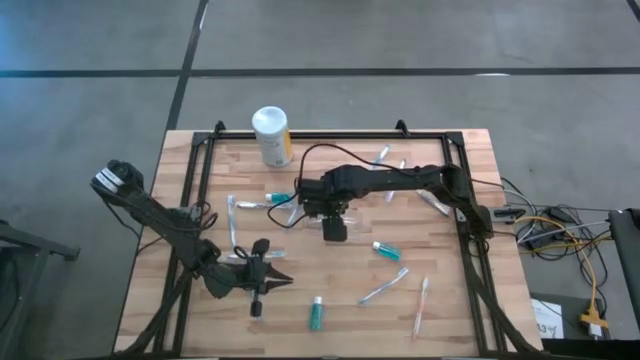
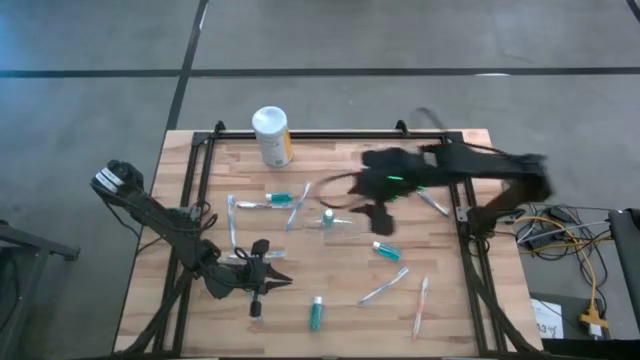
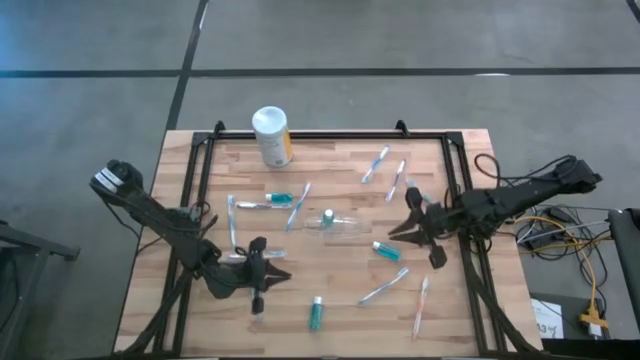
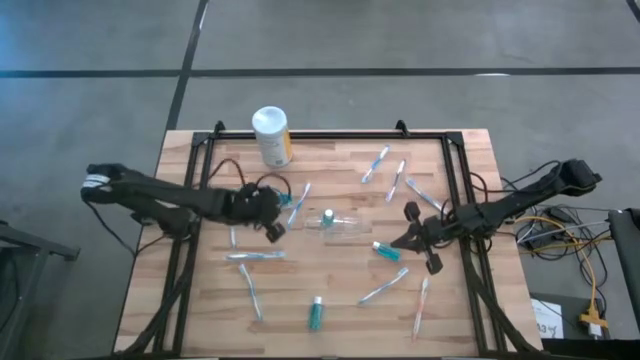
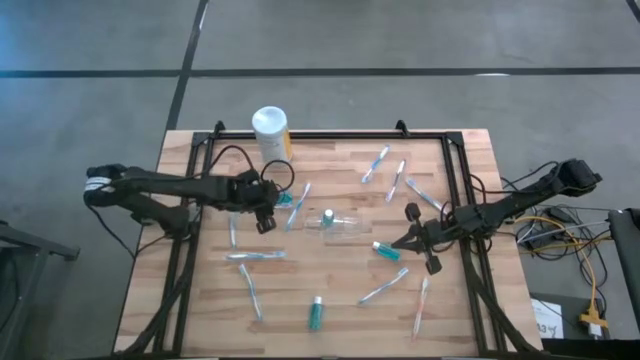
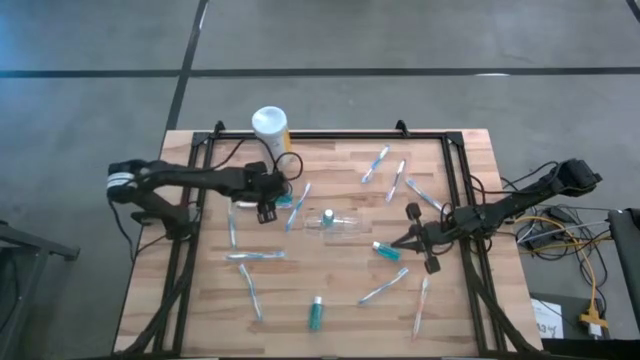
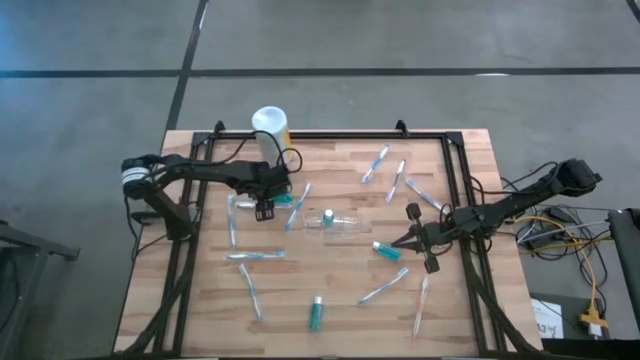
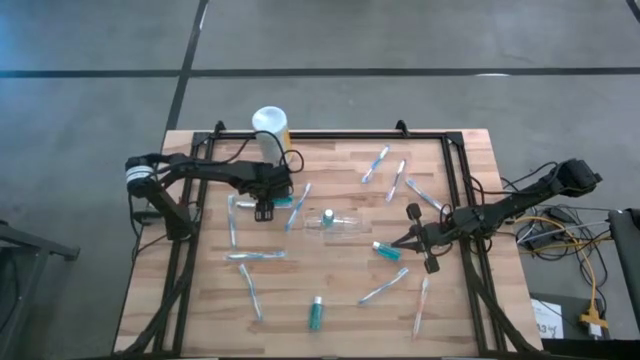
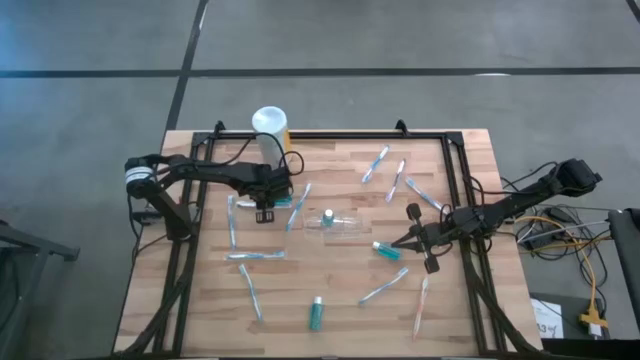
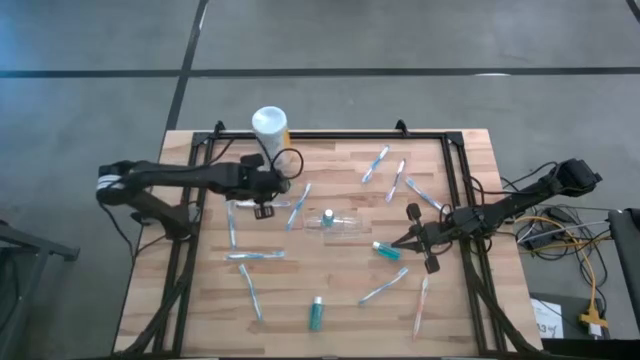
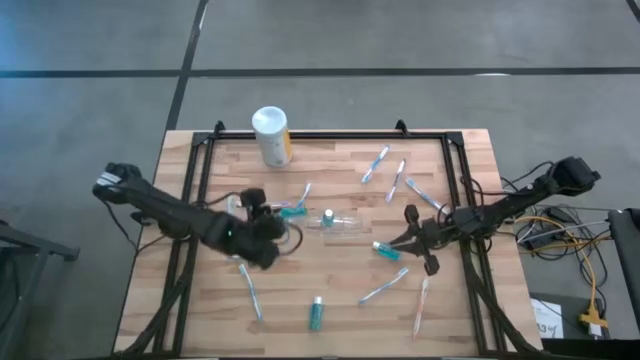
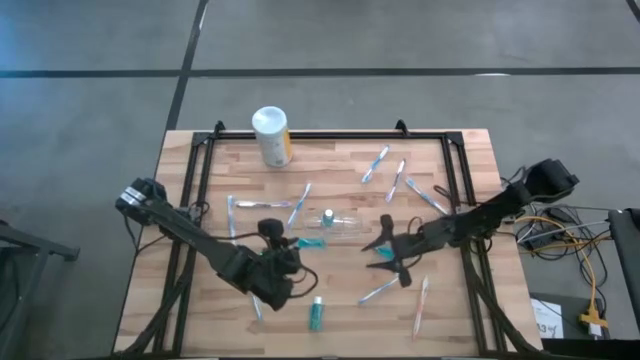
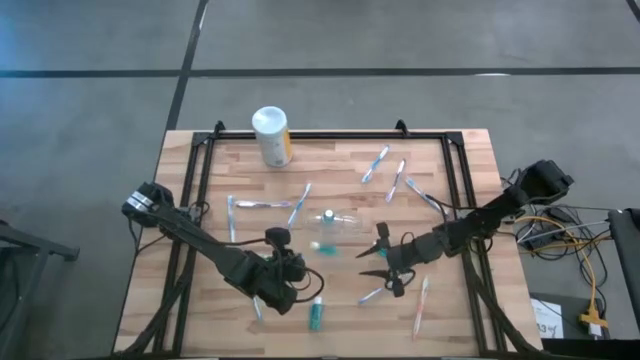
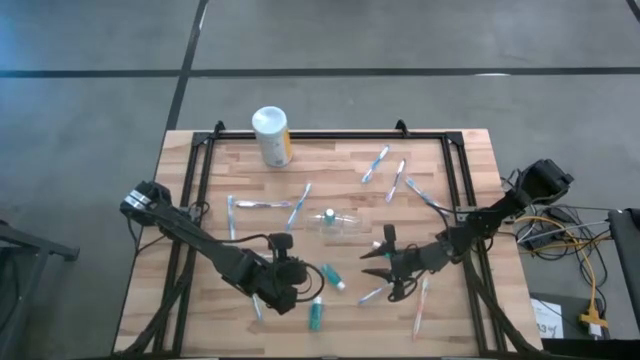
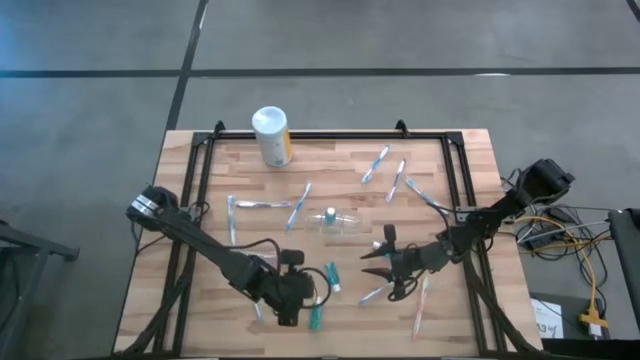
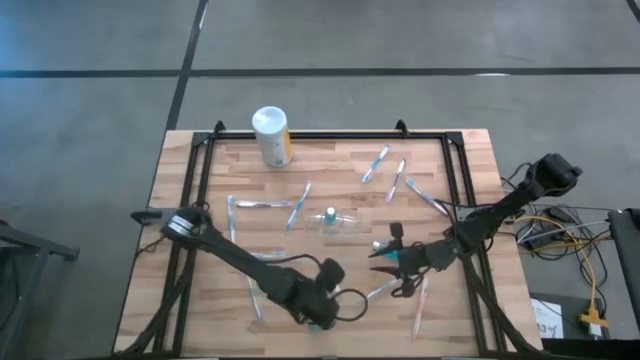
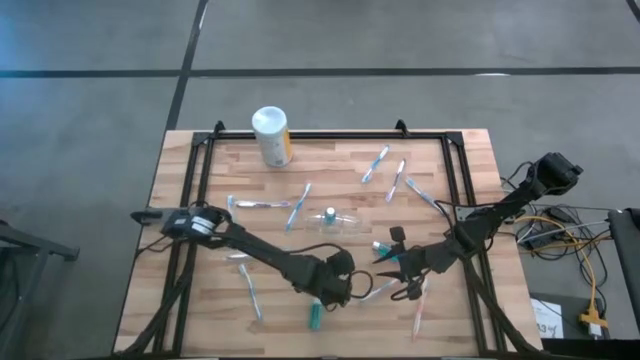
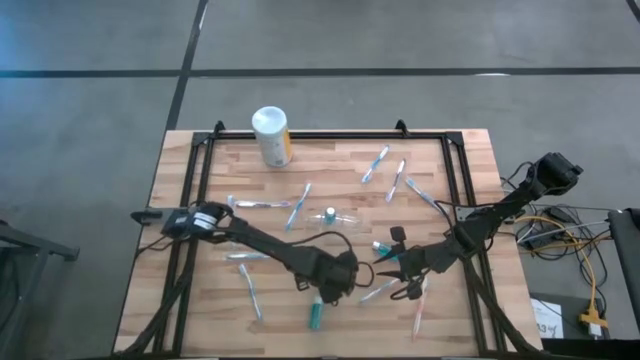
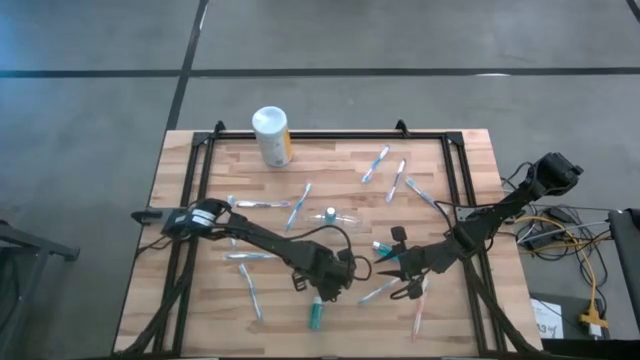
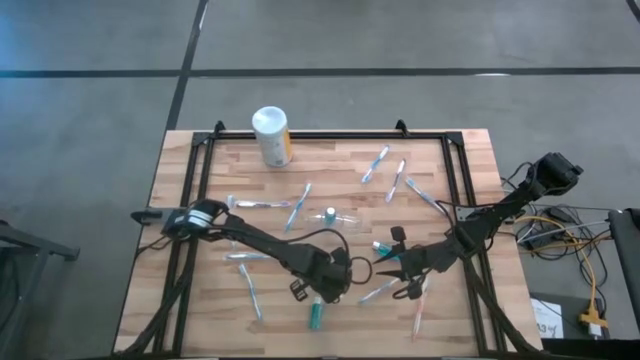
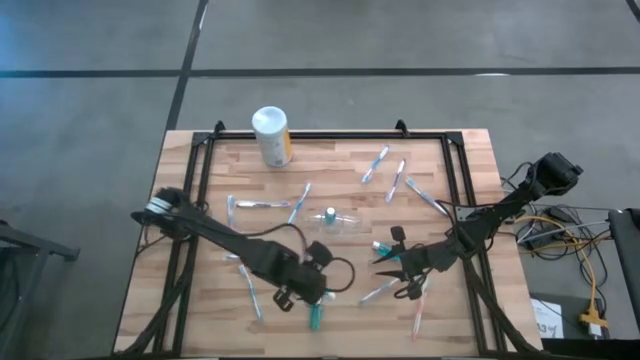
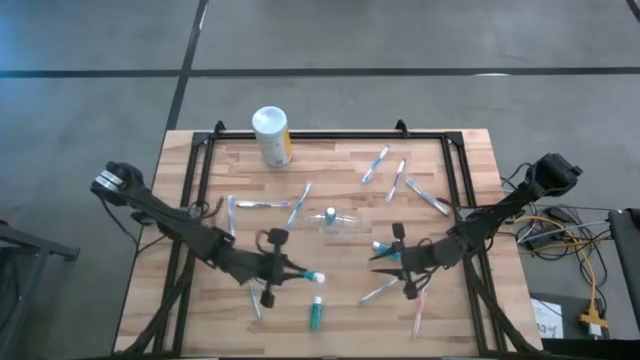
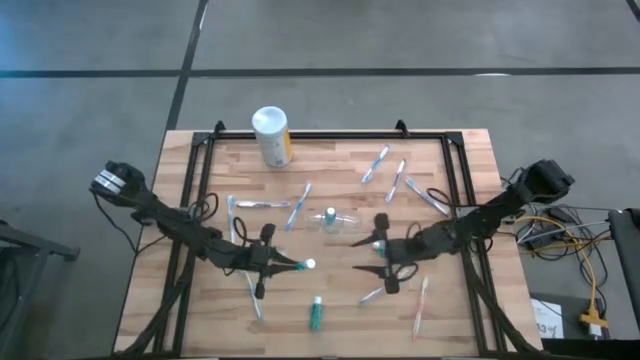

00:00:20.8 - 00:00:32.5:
Task: Pick & Place toothbrushing station
Put the mouthwash into the transparent organizer

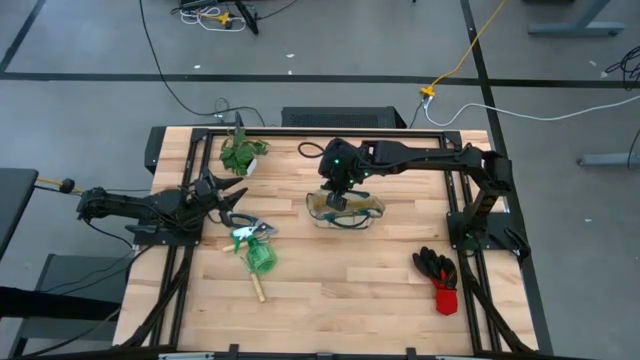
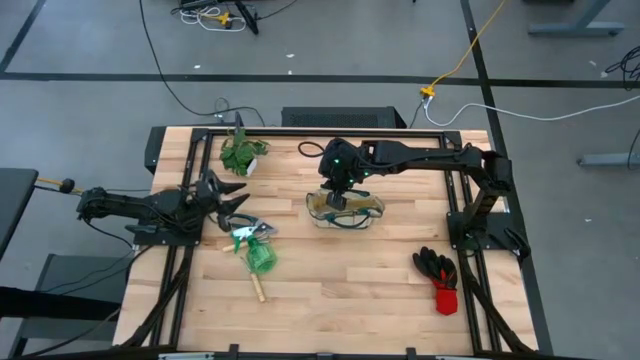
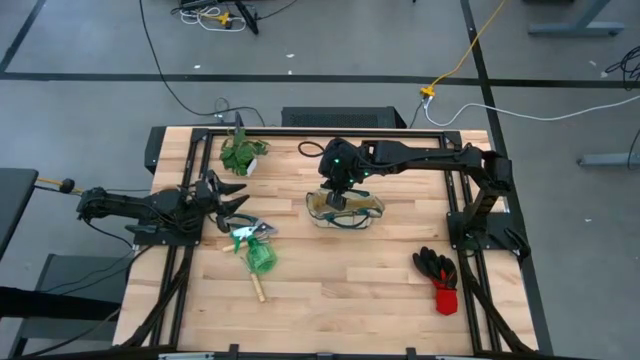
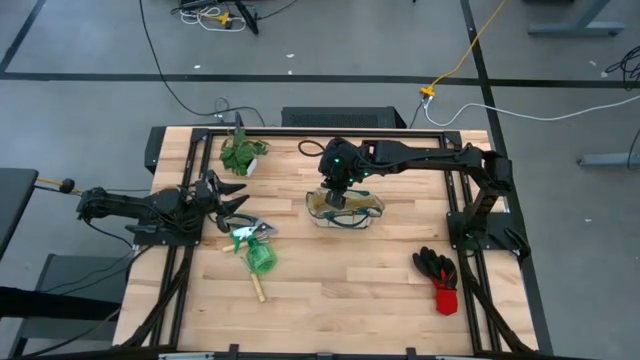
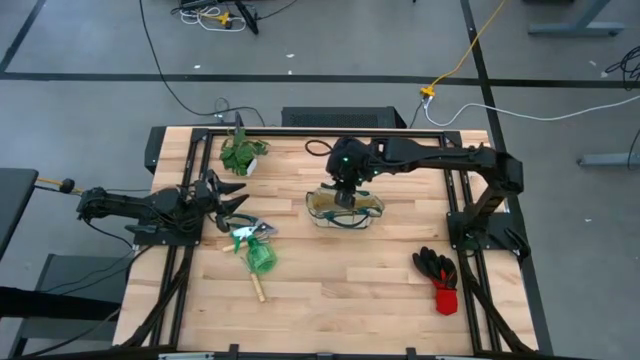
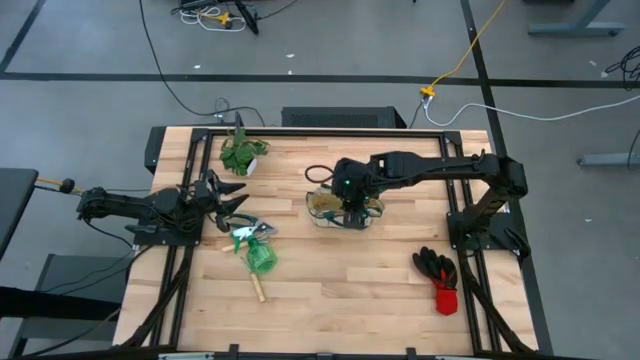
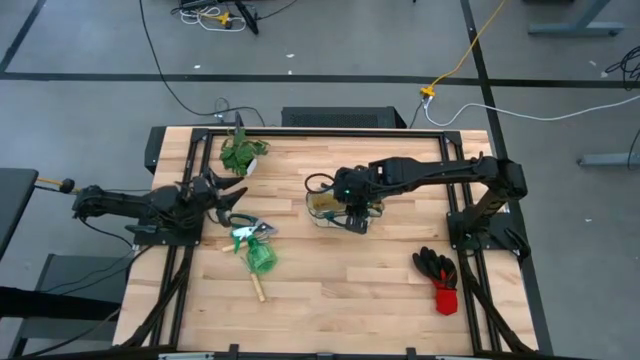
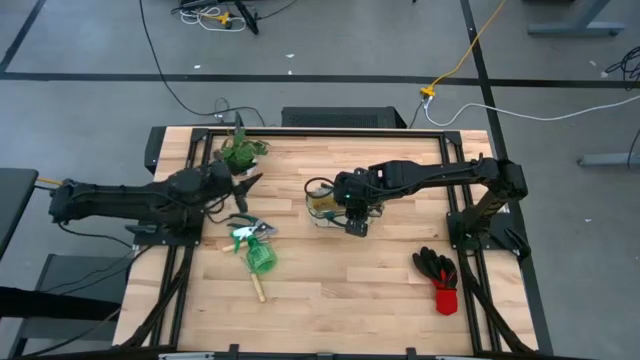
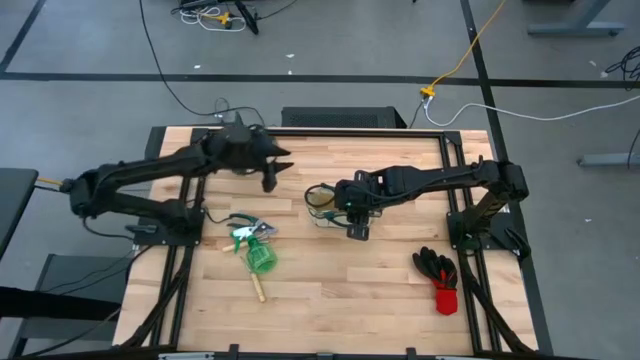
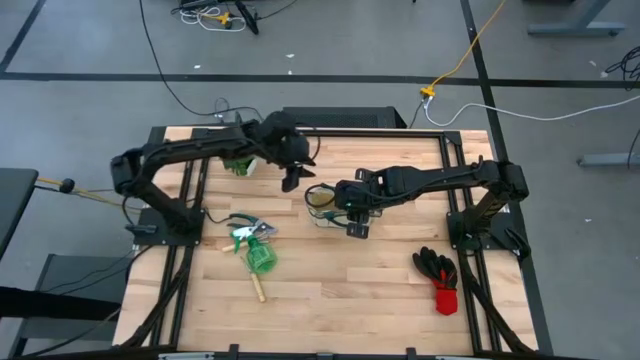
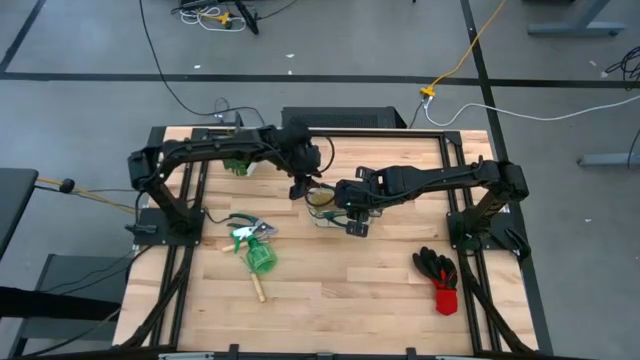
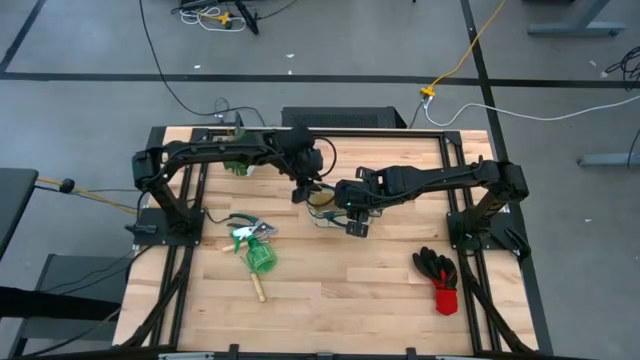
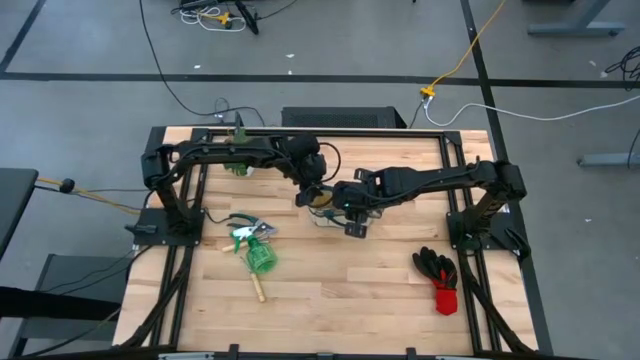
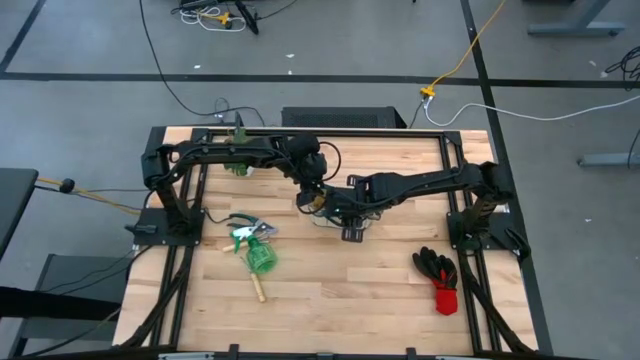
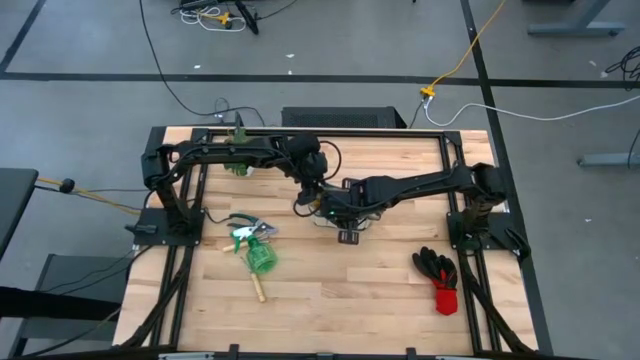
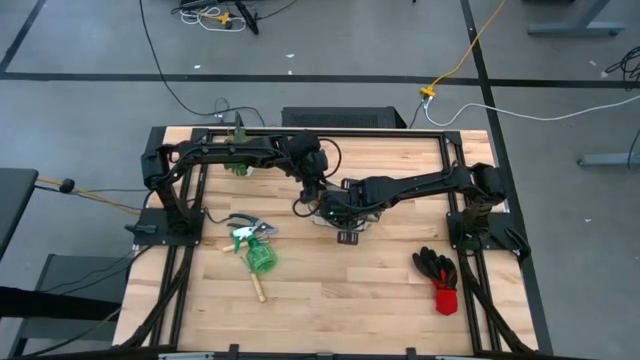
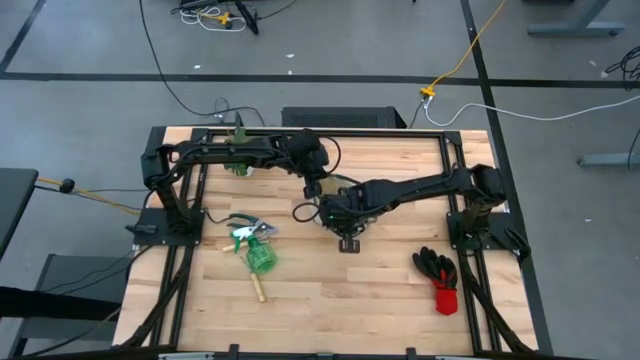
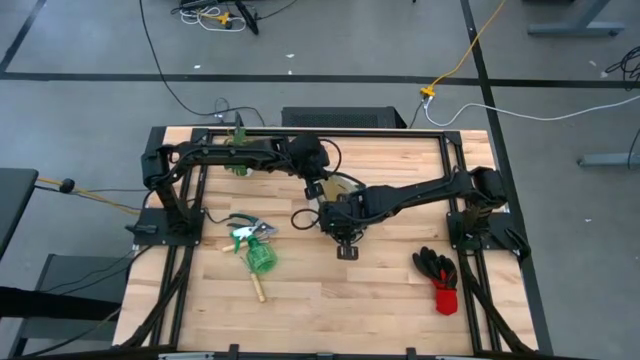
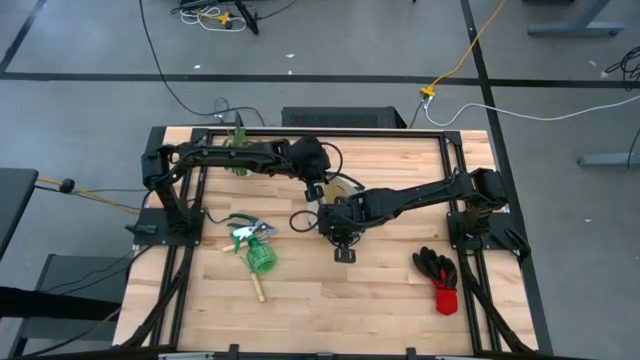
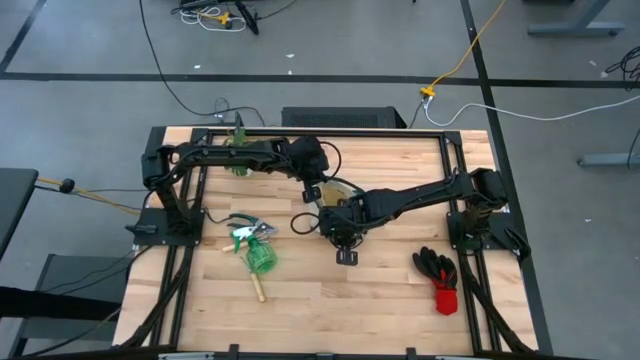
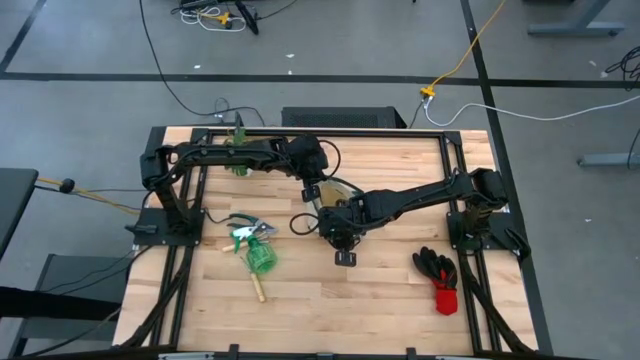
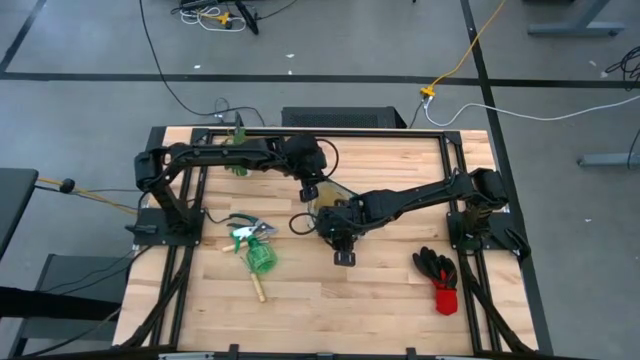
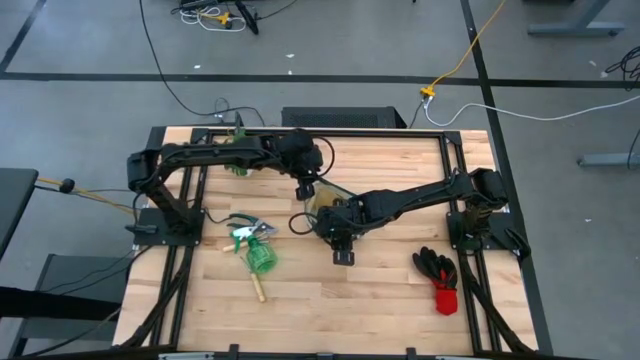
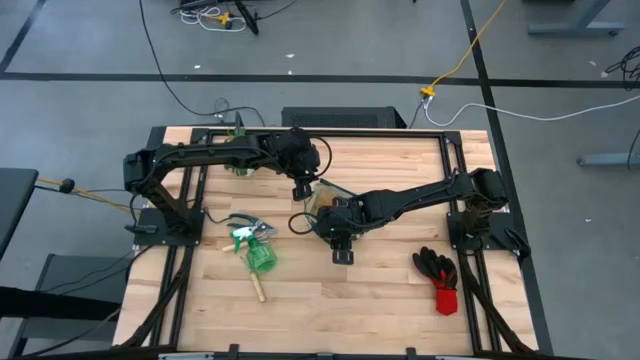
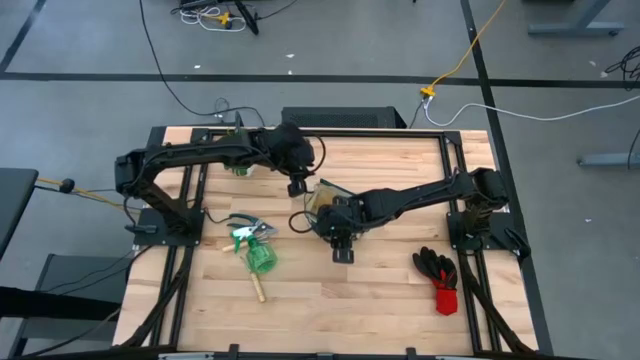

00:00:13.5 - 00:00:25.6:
Task: Pick & Place Garden tools in Gardening bag
Prepare the white gardening bag
